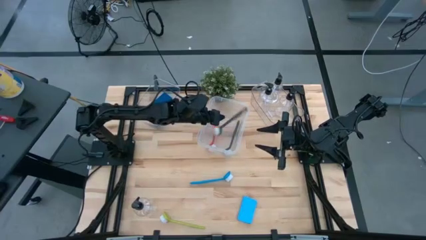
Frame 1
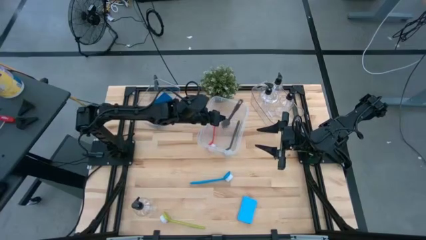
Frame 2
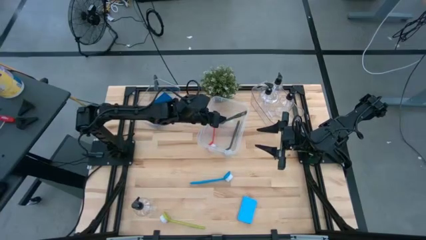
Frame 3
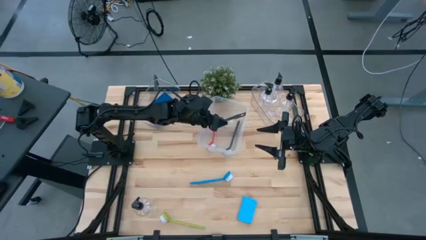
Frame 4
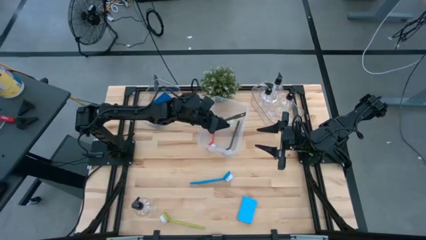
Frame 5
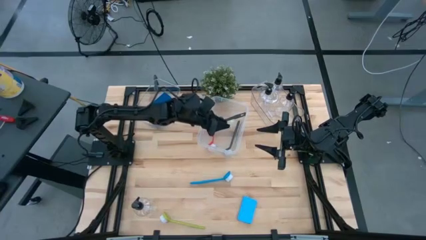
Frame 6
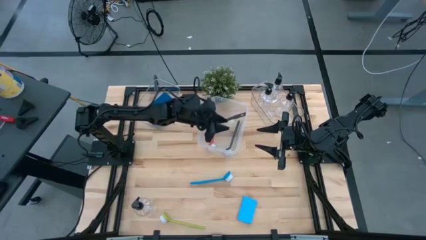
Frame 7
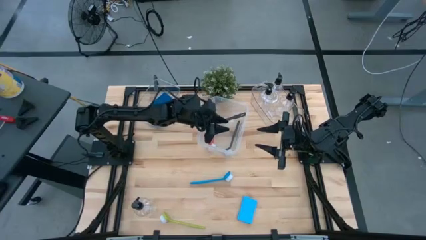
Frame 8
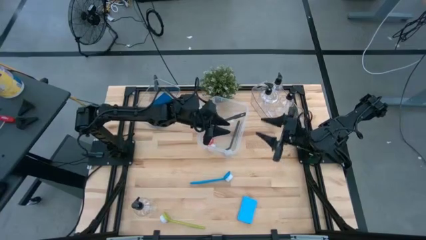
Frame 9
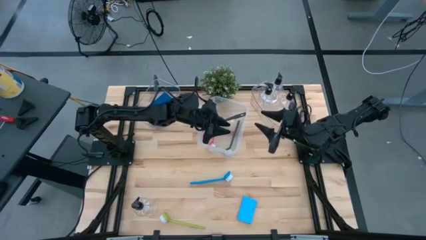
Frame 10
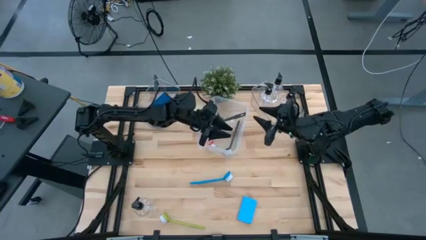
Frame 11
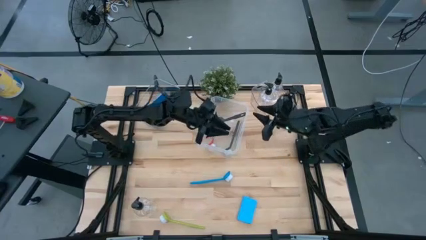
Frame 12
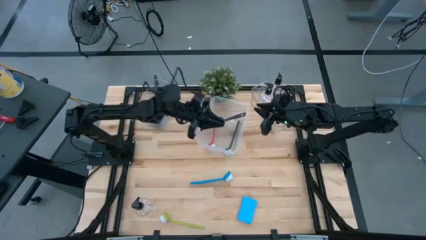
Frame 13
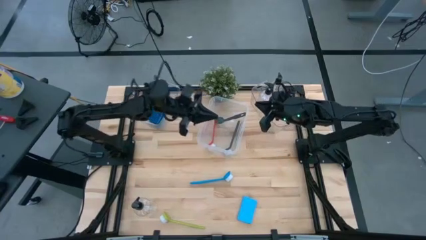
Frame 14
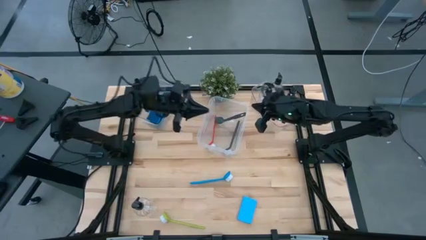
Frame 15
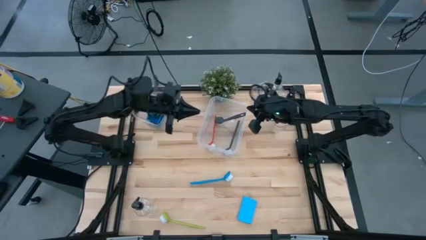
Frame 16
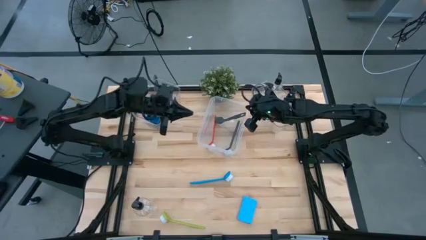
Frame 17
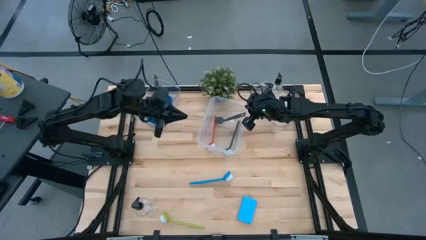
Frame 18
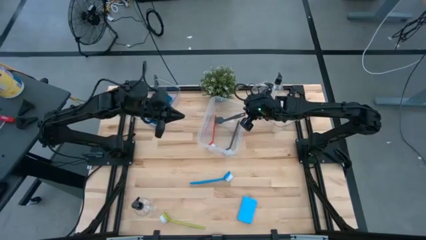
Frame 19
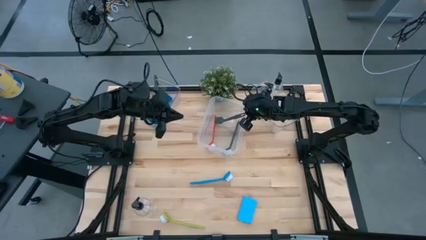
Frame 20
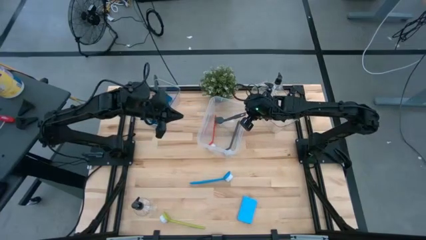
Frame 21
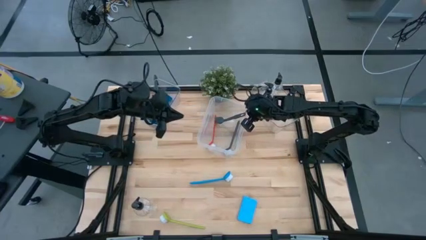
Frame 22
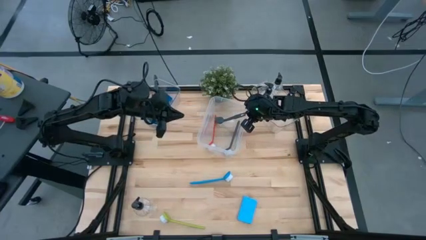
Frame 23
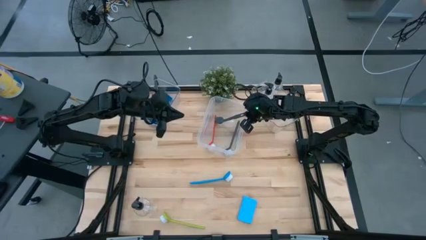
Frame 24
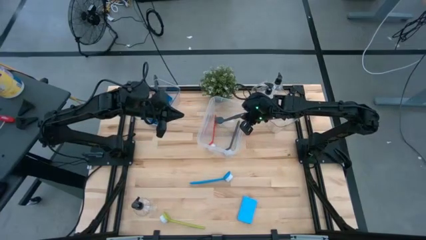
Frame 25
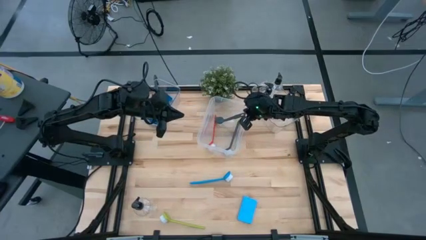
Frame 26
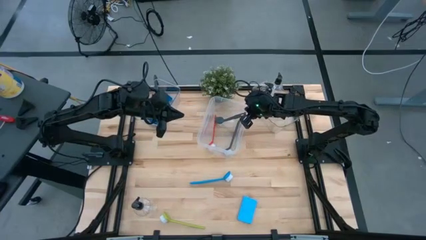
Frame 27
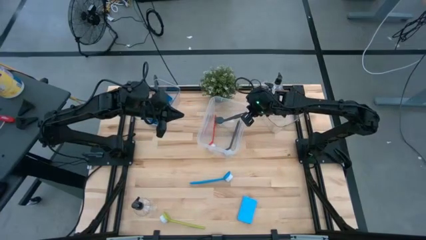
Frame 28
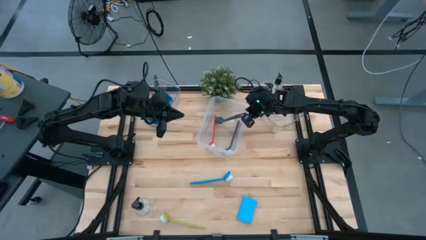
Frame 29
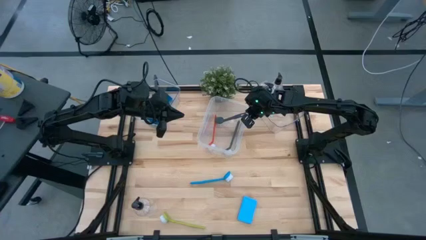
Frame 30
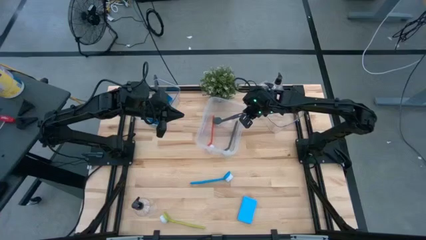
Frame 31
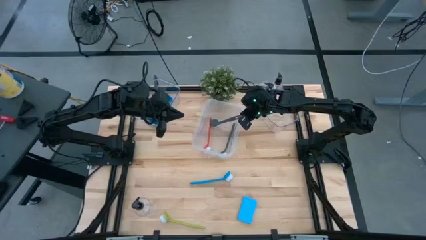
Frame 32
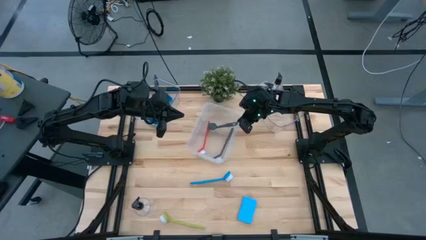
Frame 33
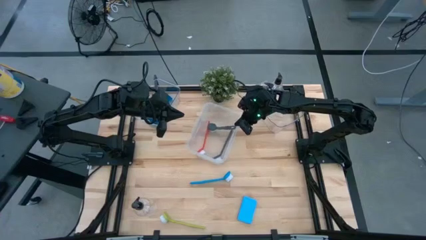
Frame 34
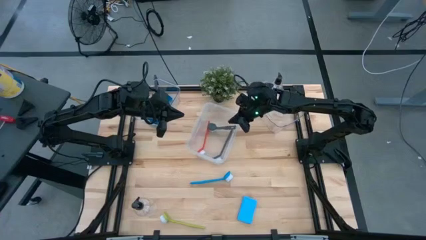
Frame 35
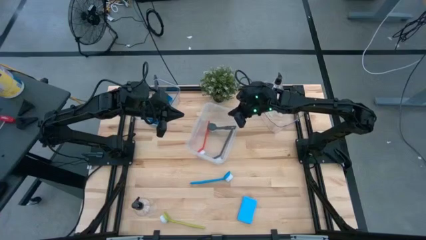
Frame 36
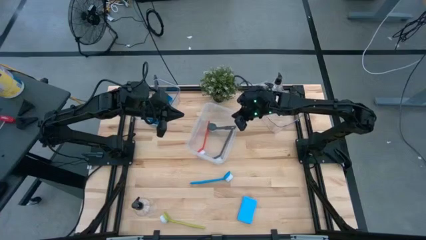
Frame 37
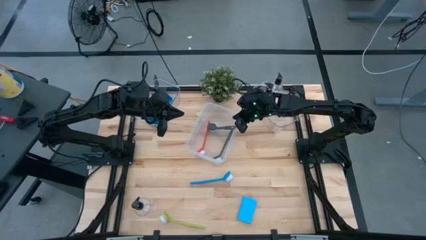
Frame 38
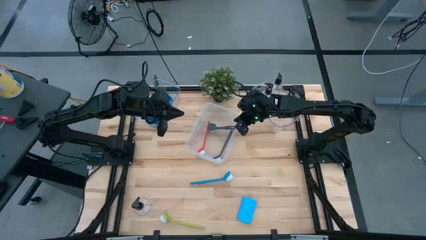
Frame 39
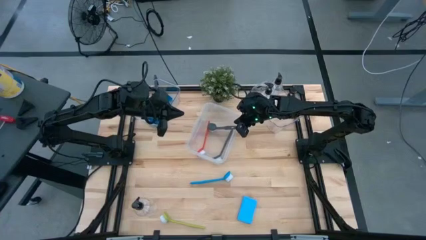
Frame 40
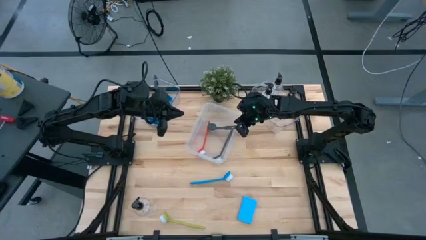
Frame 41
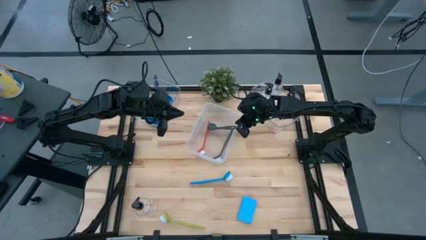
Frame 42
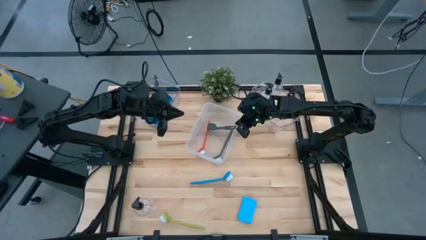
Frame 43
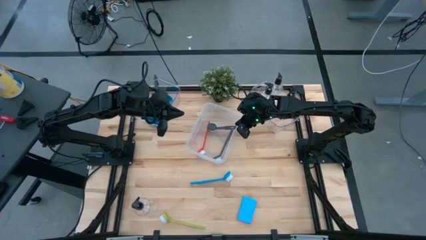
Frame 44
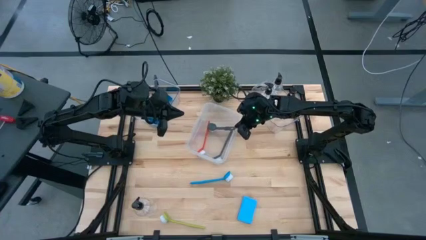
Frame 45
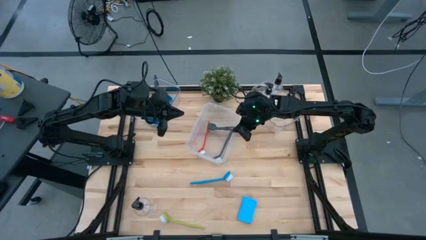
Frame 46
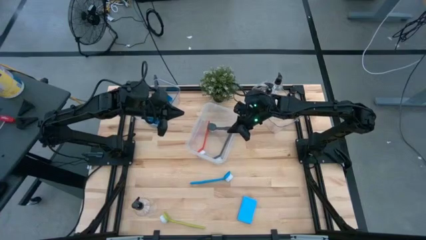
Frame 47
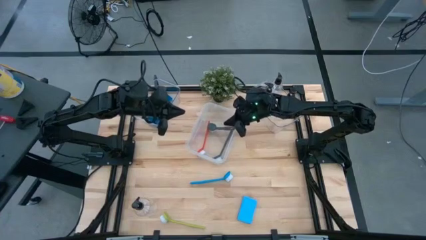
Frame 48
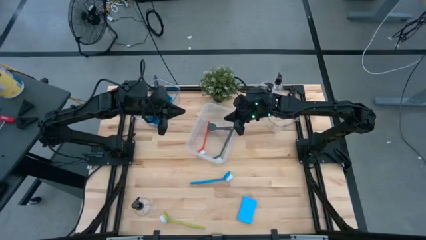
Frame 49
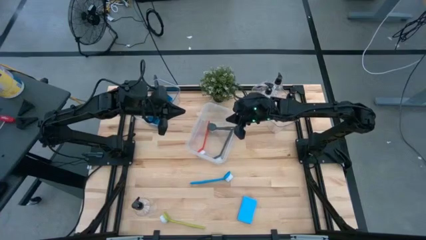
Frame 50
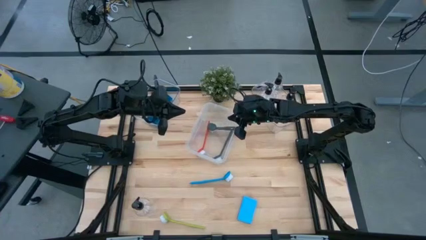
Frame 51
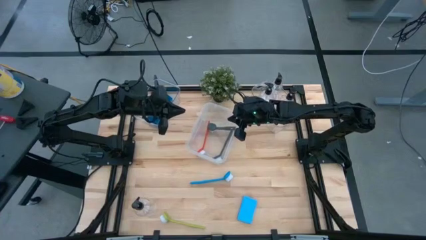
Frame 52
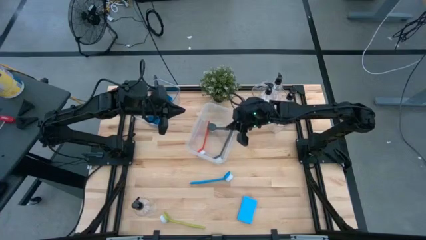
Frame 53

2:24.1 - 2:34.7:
Task: Pick & Place Kitchen Sink Supplies
Adjust the gray dish brush in the transparent container
